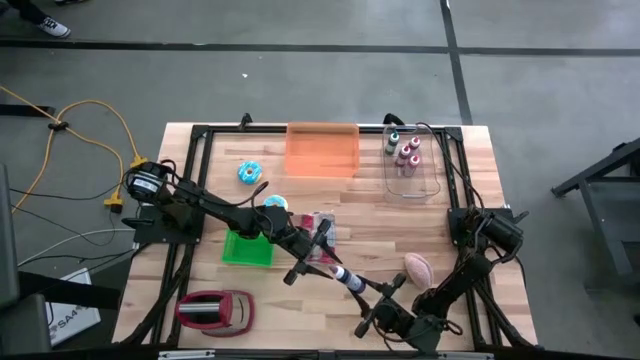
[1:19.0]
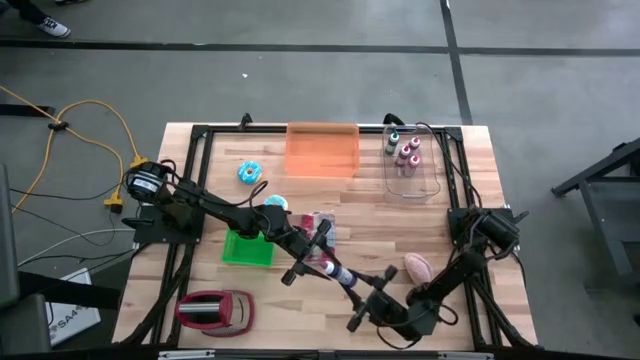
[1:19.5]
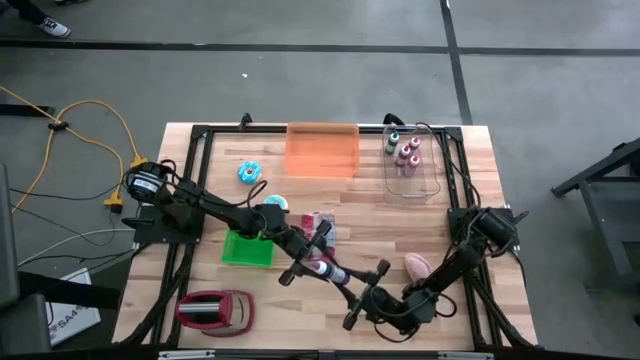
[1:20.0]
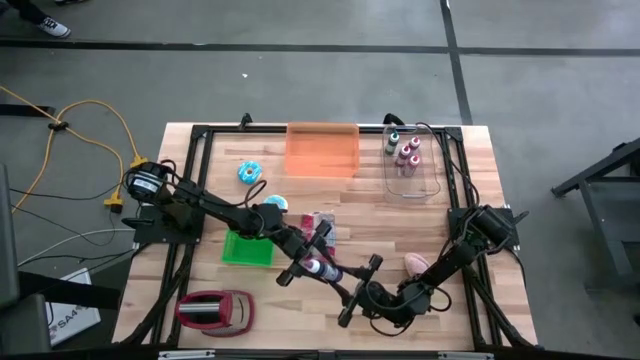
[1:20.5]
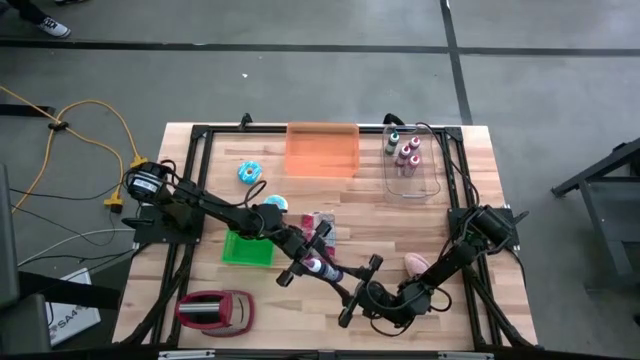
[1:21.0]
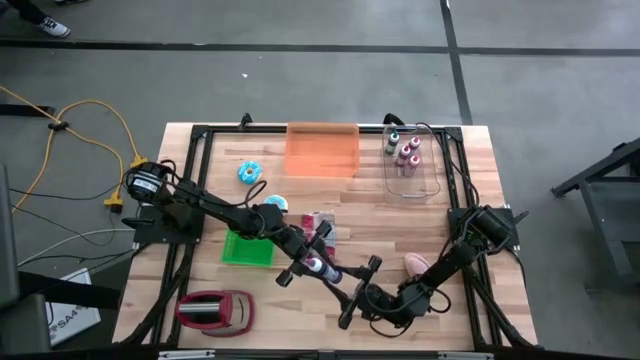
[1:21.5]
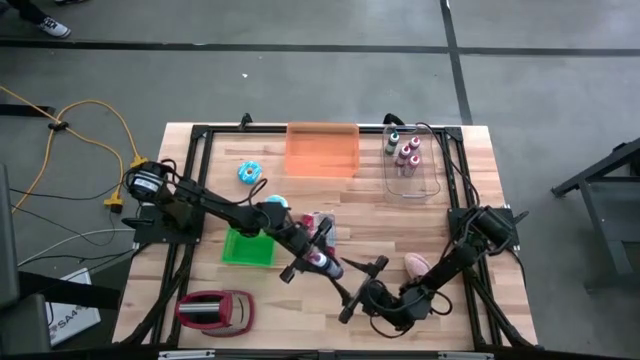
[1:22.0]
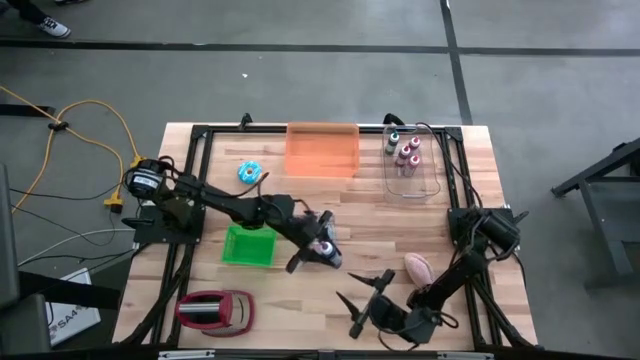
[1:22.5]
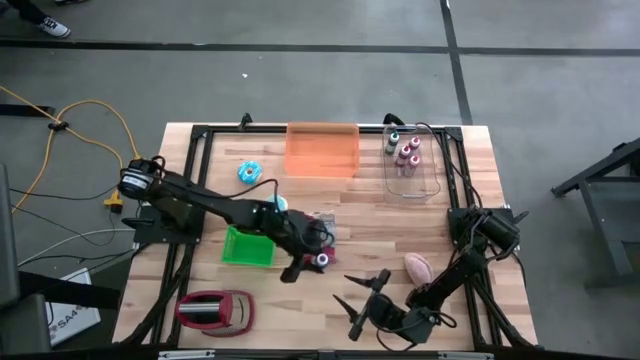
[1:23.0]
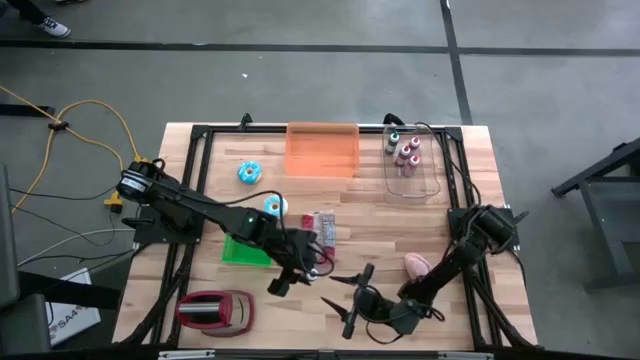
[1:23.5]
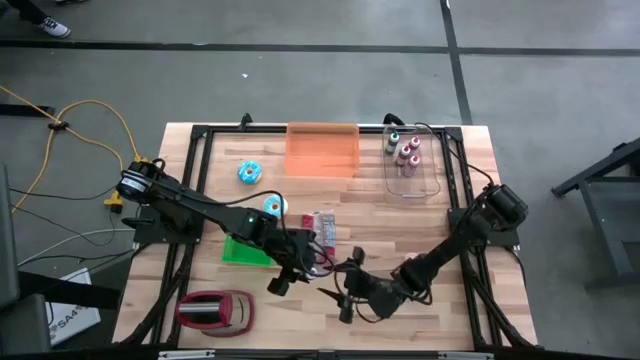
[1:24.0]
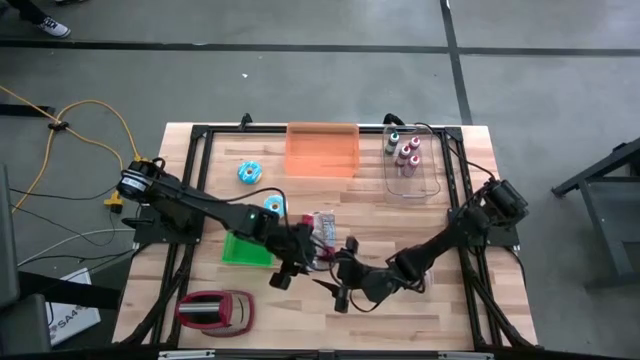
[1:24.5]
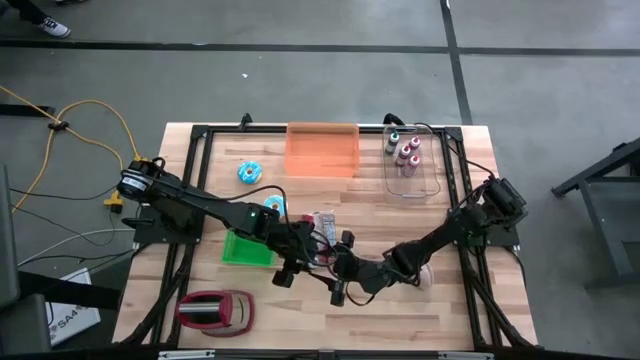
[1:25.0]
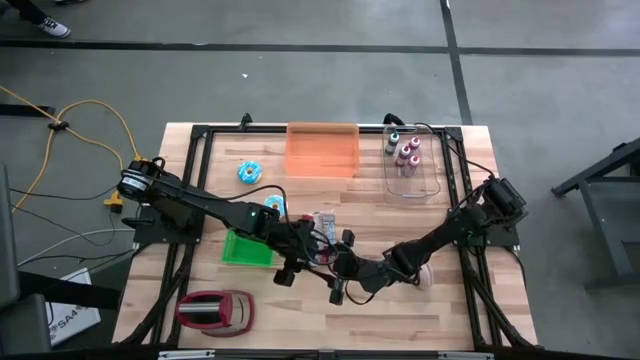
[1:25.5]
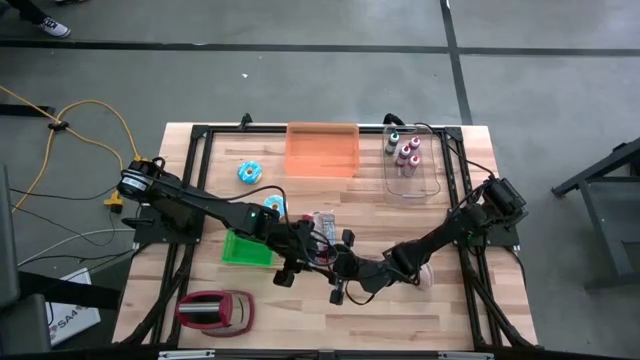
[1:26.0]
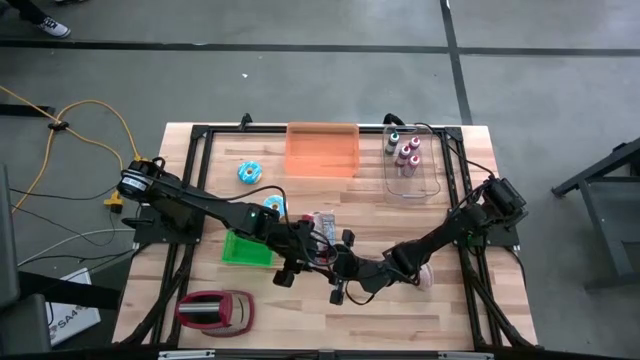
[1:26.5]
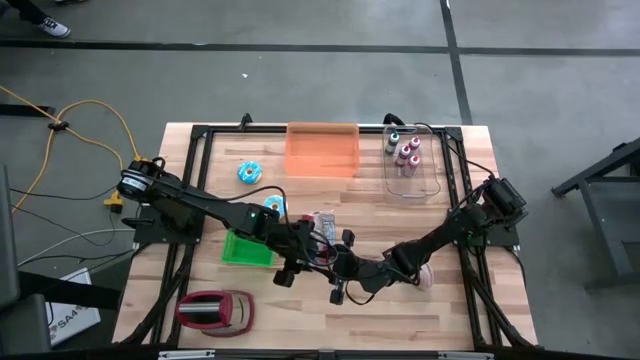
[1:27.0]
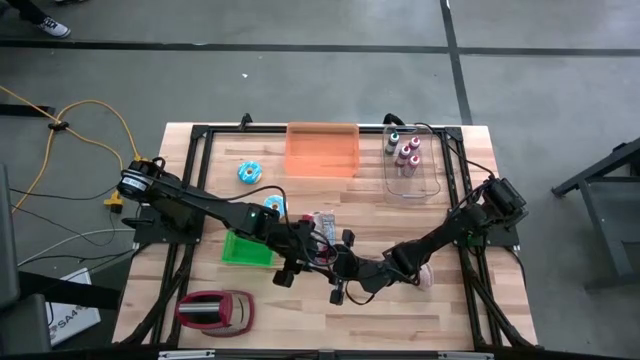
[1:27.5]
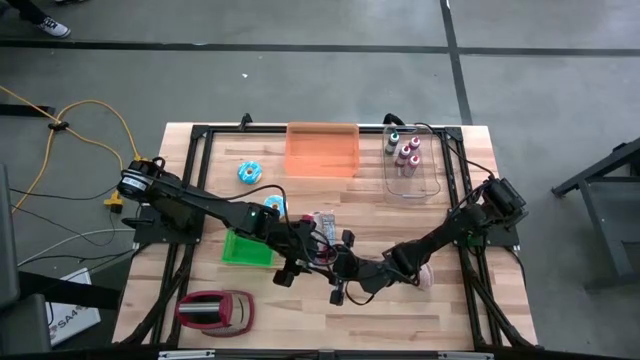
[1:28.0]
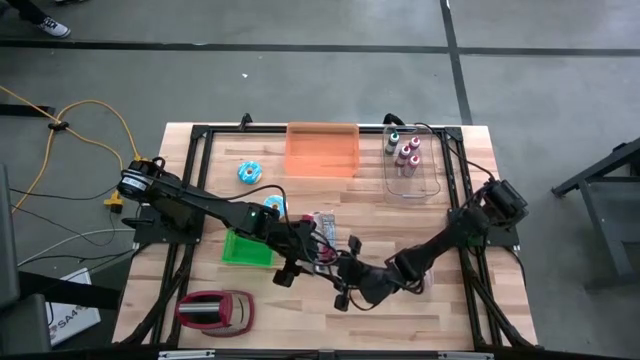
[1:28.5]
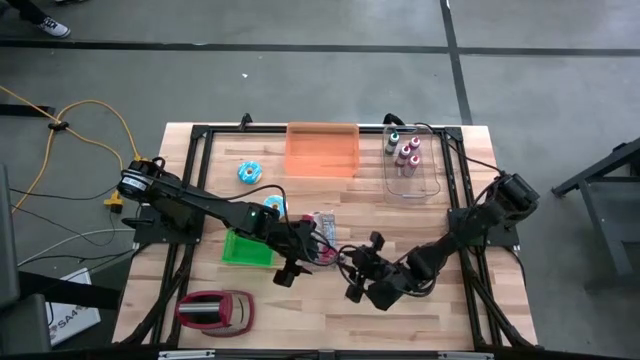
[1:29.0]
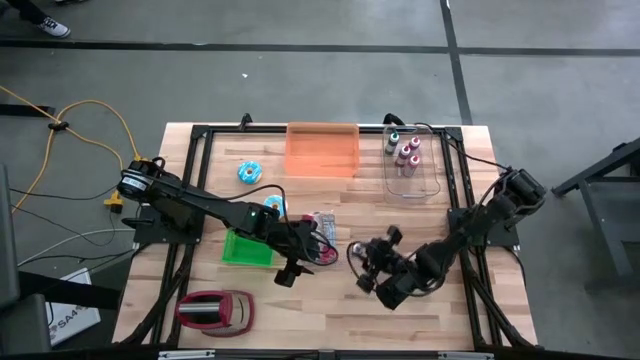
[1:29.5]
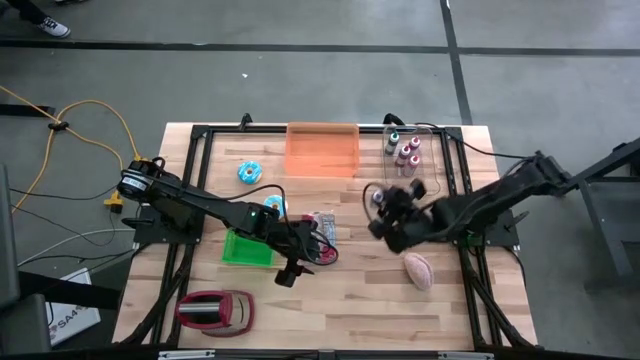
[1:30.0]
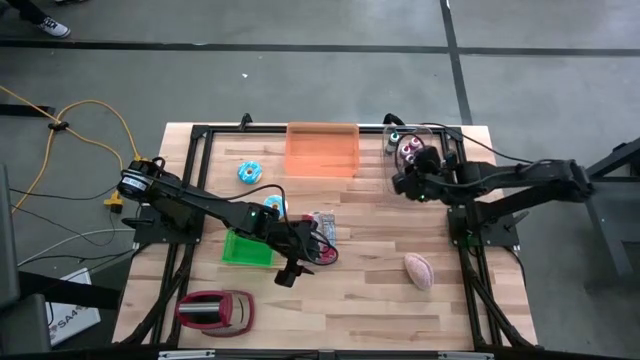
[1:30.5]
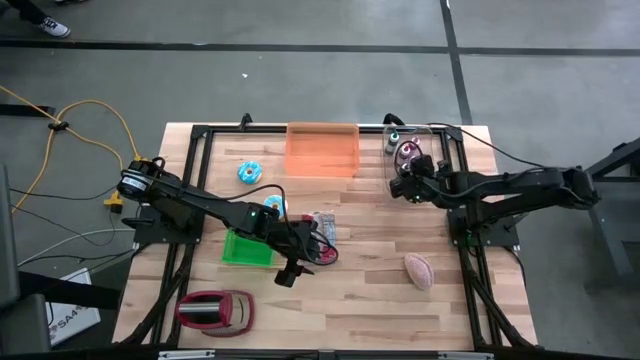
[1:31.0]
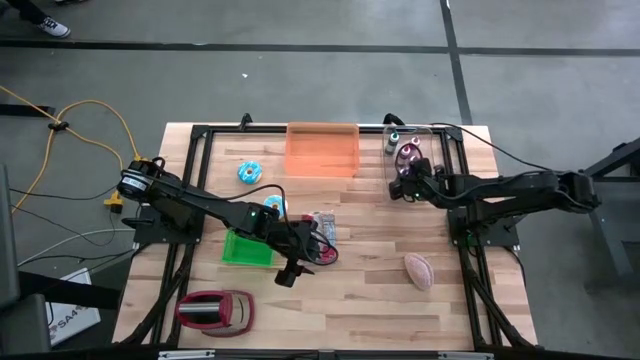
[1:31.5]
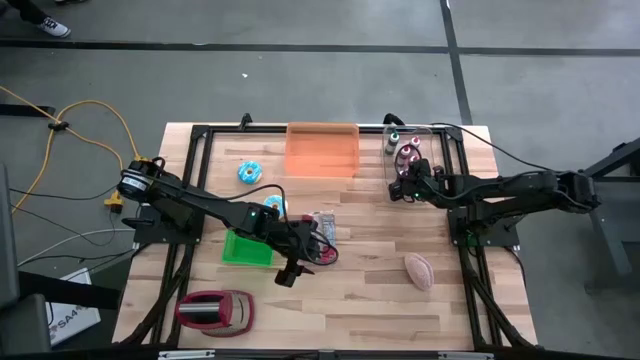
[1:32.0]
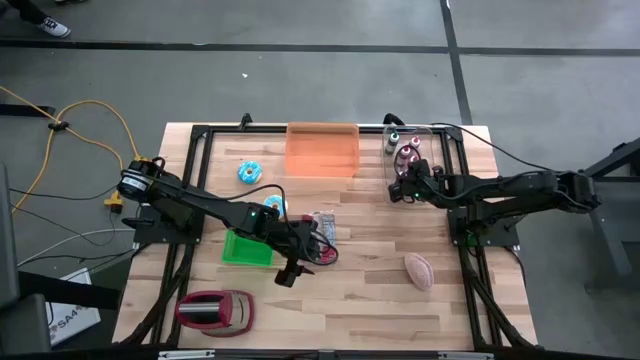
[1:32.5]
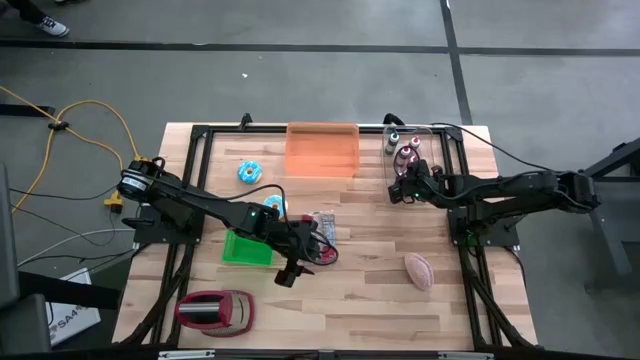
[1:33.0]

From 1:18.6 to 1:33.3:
Put the violet food coloring bottle into the transparent bin
